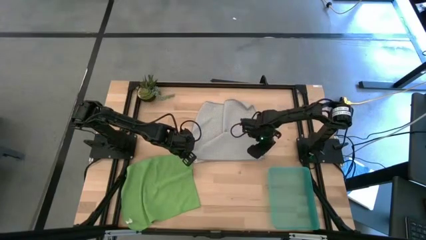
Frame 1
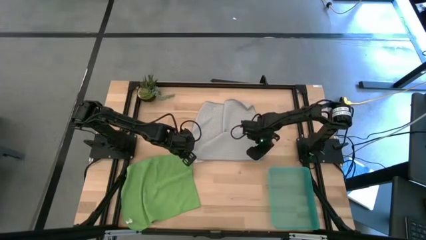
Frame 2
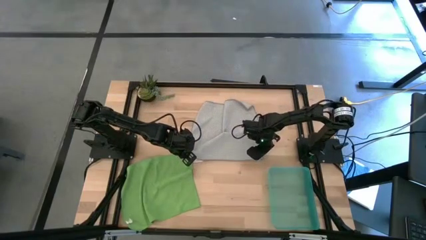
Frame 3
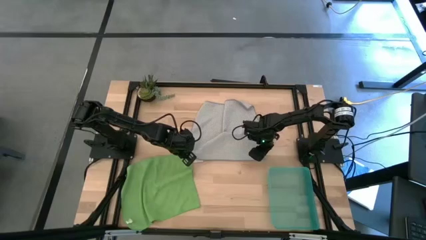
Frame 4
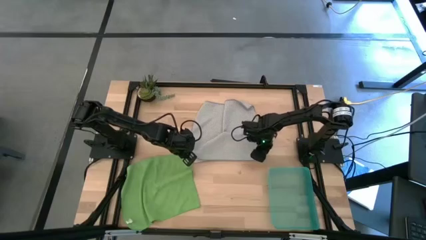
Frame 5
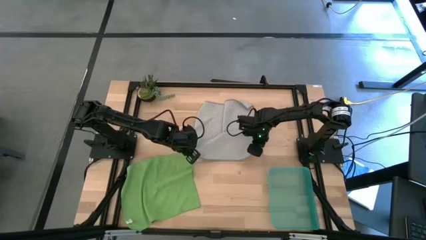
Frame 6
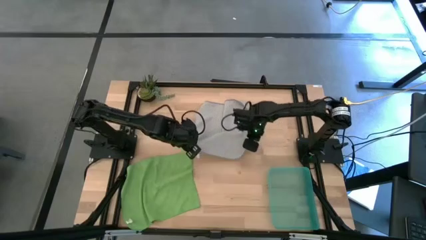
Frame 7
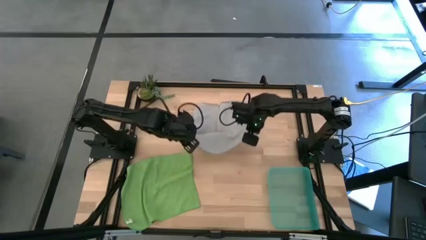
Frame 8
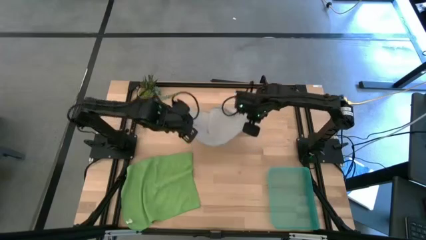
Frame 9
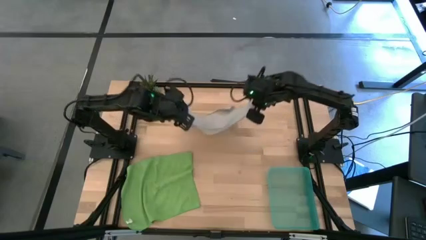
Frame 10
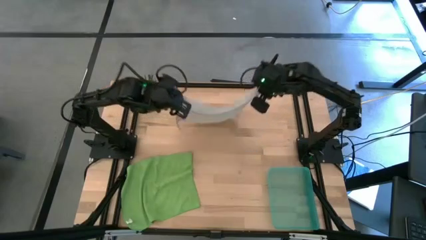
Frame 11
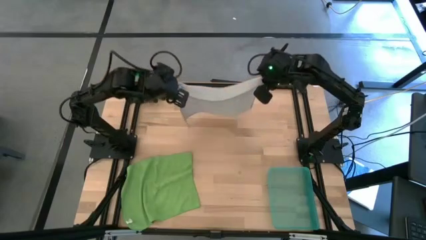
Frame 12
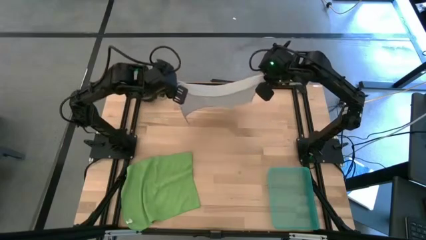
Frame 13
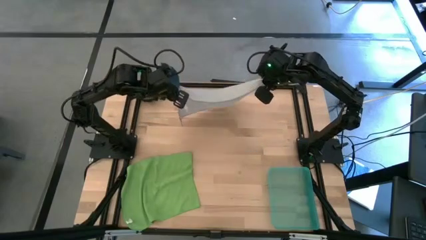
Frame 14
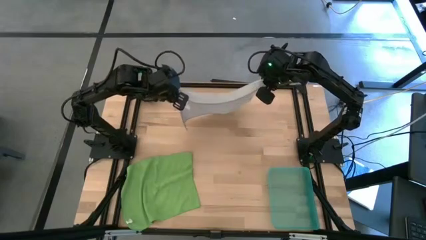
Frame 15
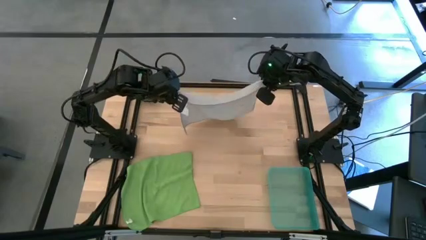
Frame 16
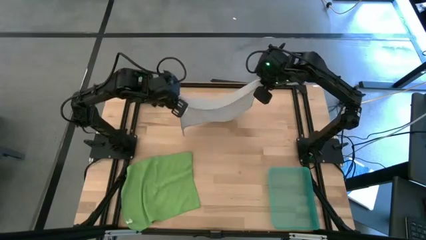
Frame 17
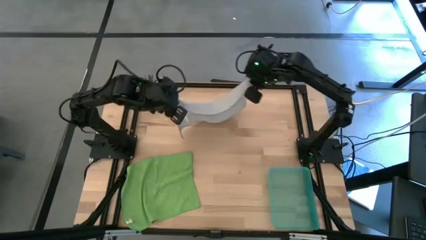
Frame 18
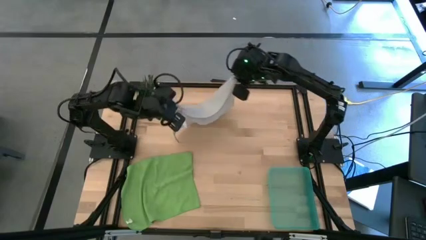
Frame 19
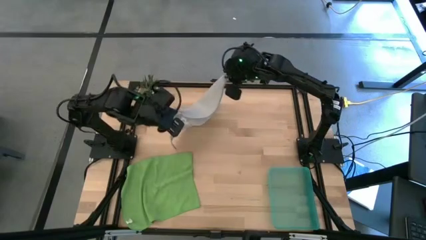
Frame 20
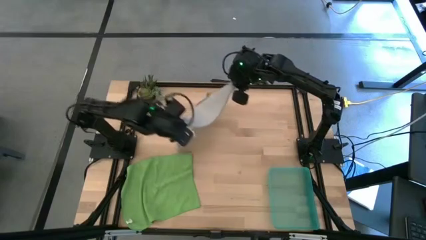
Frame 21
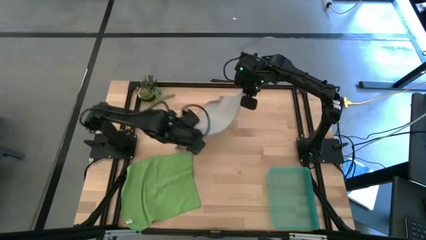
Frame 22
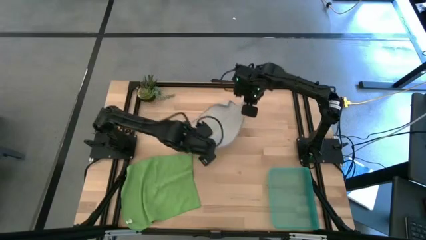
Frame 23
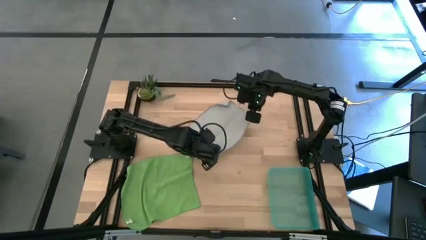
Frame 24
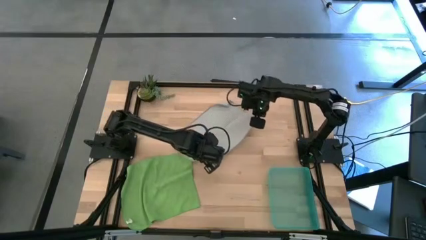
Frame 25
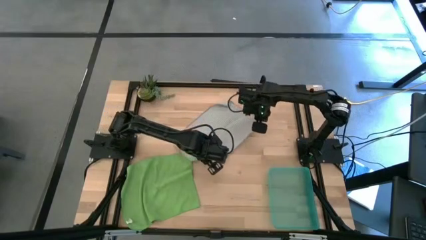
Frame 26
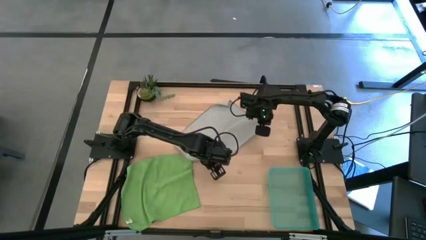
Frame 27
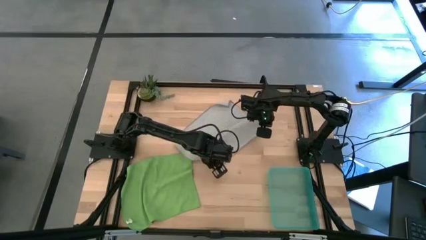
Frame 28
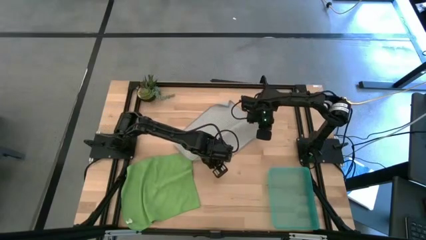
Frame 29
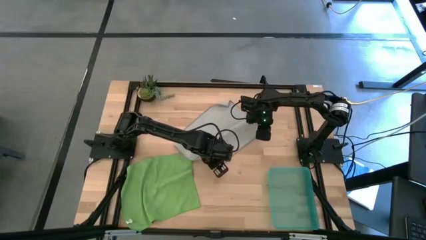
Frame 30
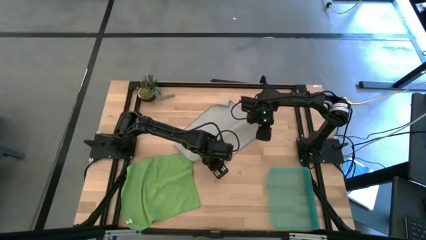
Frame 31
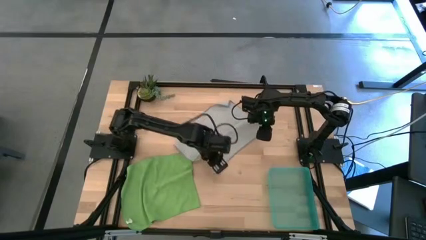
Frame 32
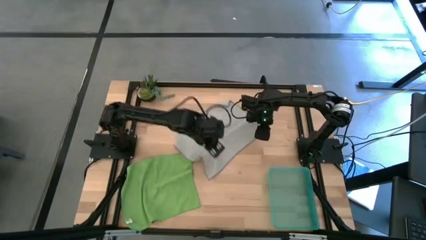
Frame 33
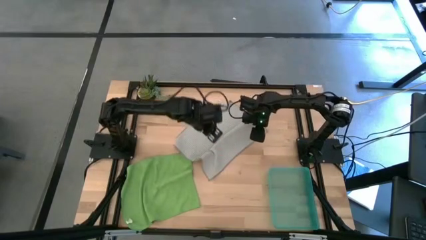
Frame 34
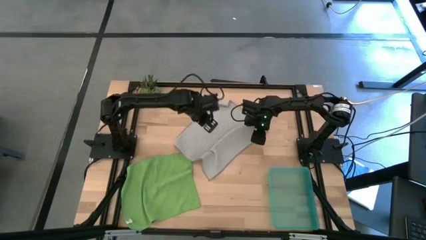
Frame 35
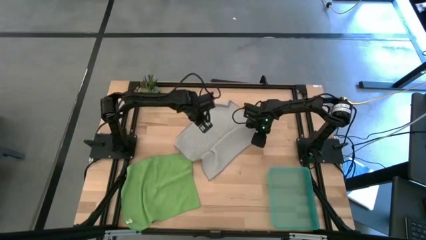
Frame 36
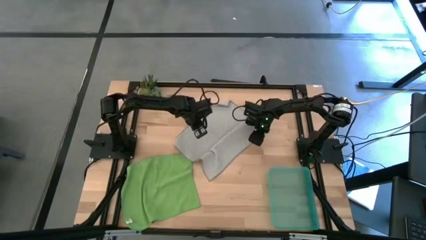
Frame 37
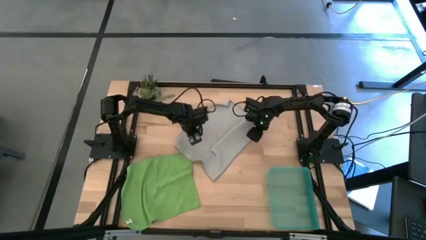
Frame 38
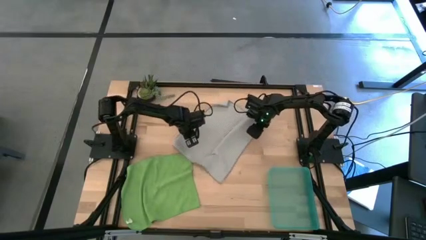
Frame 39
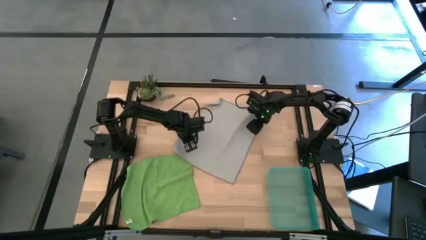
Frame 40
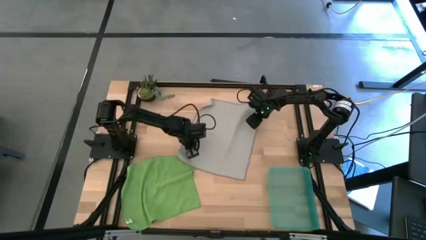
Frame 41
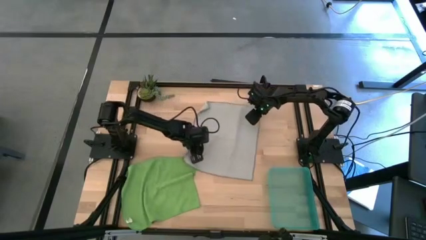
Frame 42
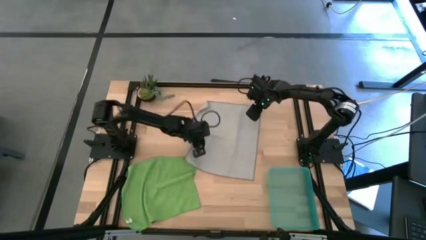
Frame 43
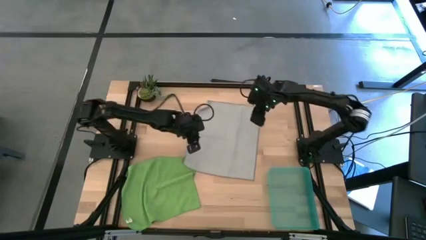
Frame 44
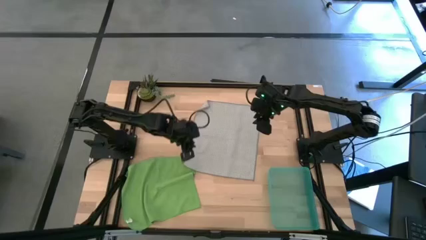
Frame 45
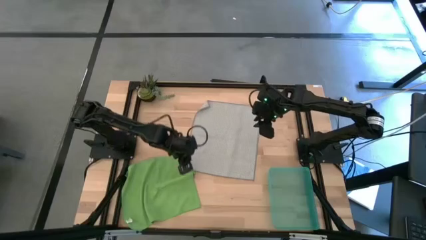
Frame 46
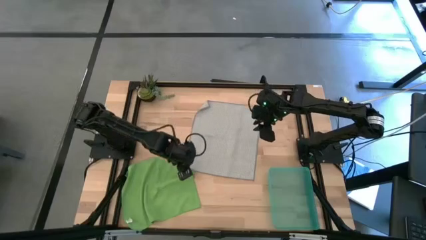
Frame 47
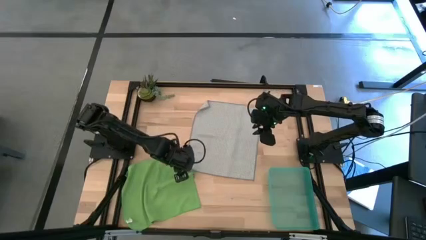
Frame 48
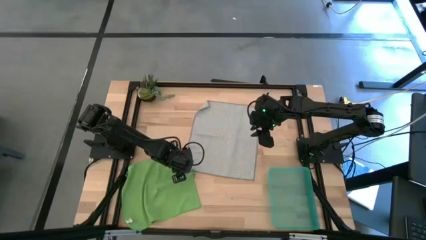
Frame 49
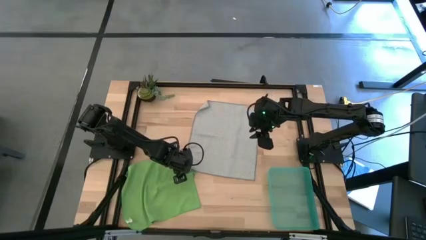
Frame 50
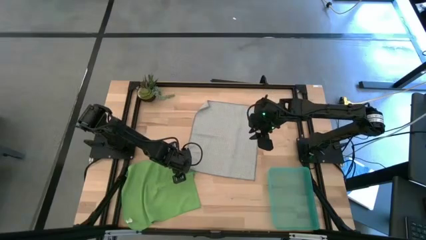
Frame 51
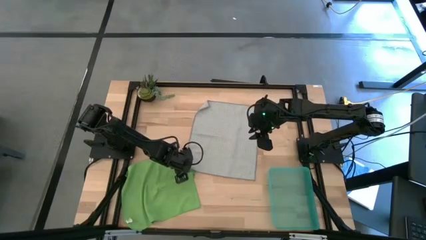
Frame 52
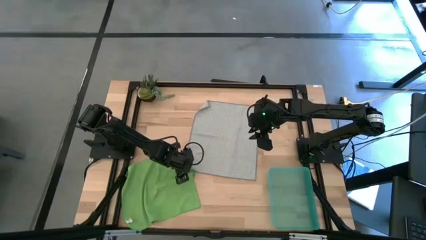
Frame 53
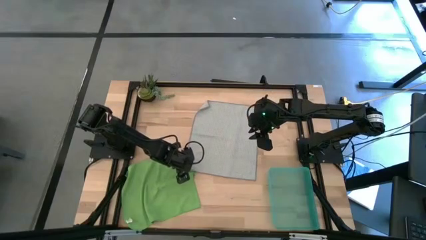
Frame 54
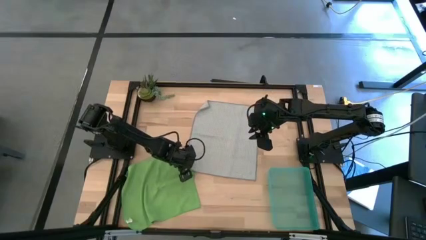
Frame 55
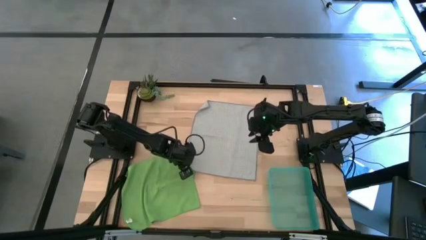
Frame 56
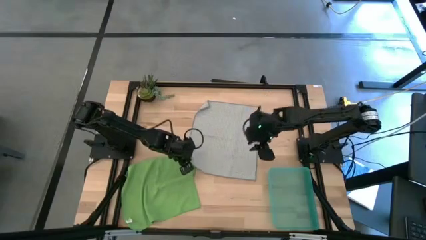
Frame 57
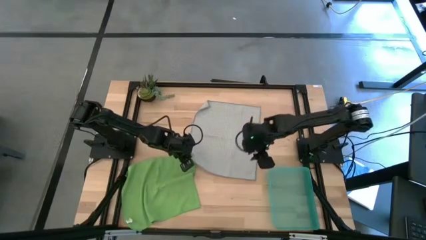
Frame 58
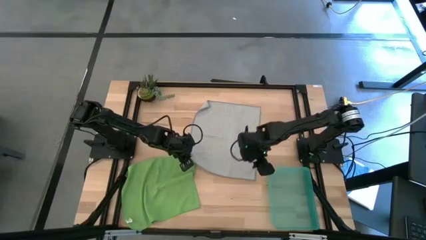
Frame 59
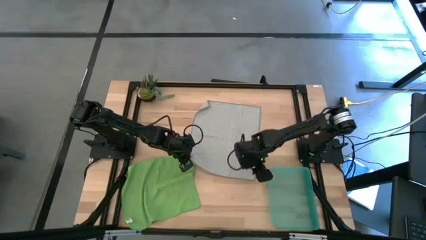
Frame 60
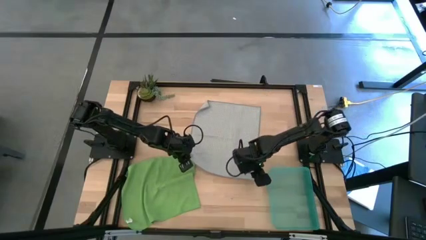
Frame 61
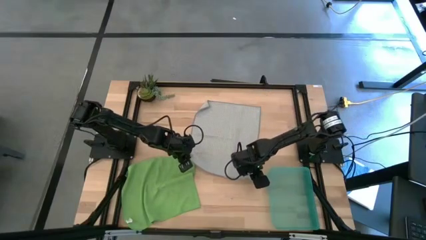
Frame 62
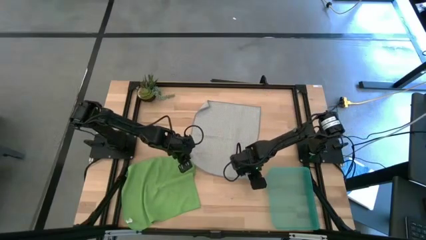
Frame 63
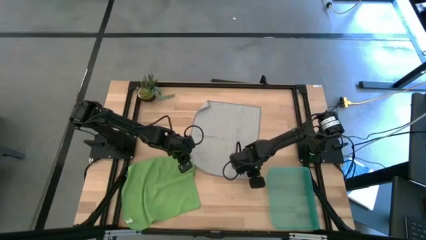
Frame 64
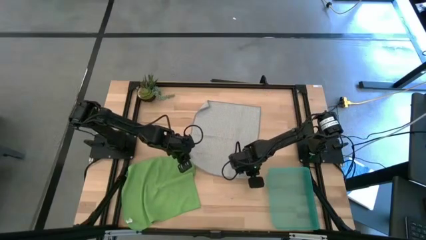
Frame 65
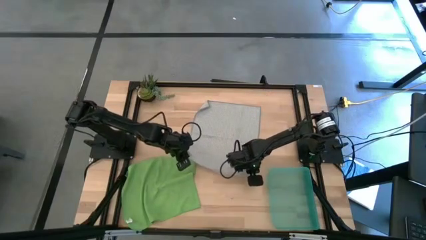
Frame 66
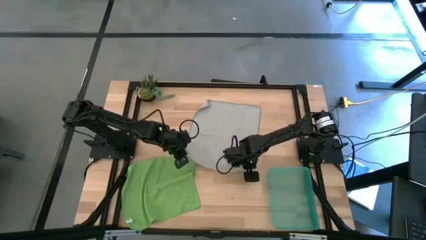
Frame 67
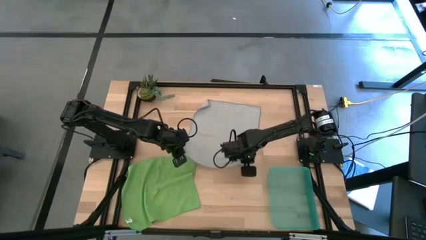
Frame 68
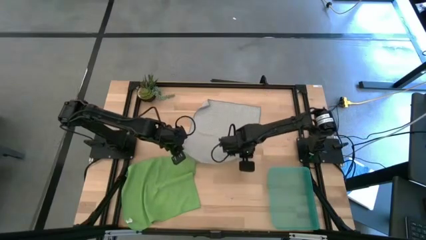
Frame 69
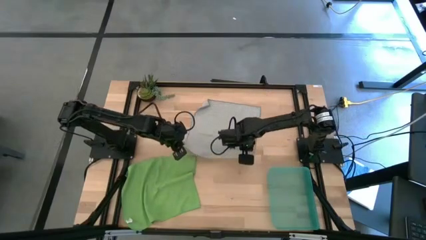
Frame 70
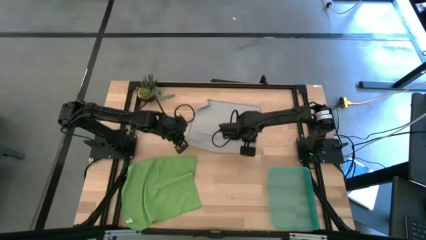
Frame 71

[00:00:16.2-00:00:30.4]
Task: Roll microfiber towels into tight, uniform cylinder then place into a basket
Fold the gray microfiber towel
